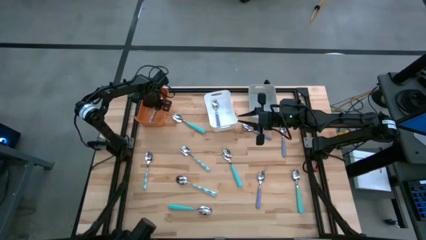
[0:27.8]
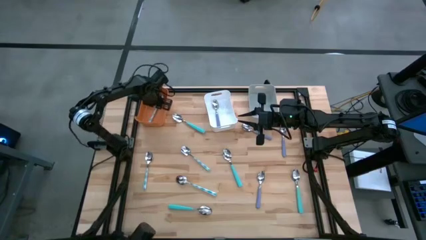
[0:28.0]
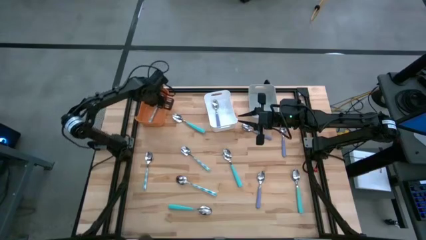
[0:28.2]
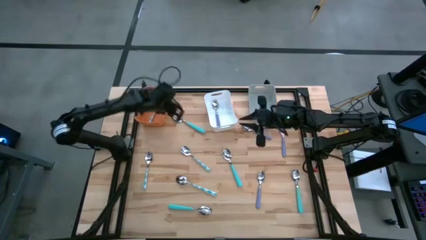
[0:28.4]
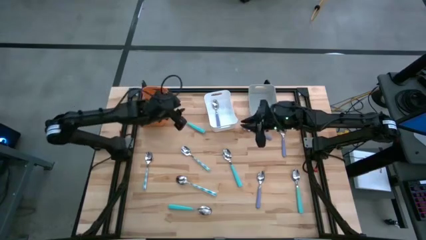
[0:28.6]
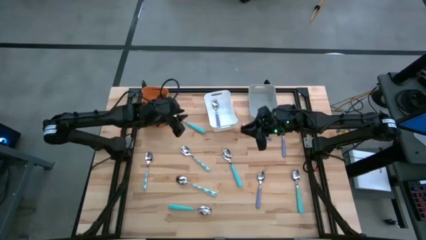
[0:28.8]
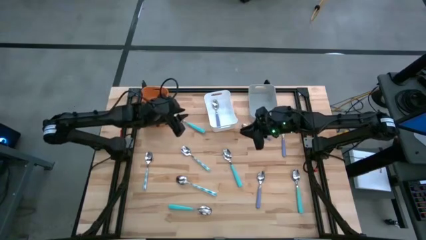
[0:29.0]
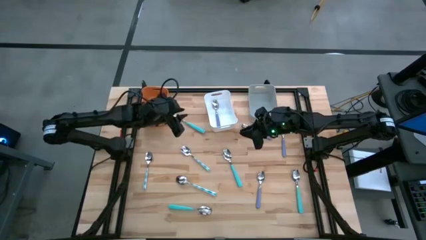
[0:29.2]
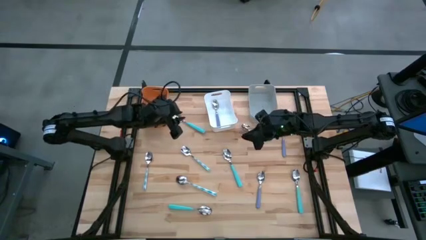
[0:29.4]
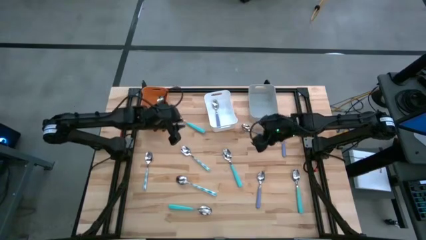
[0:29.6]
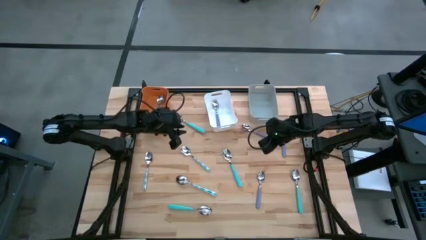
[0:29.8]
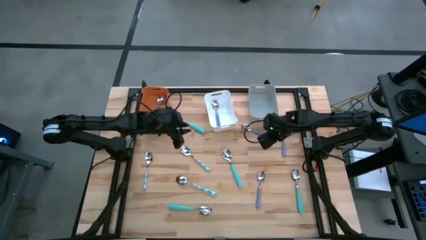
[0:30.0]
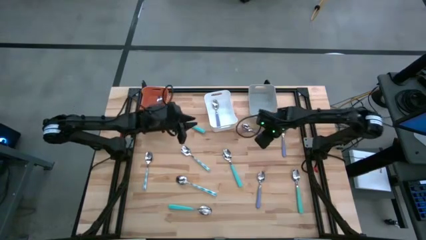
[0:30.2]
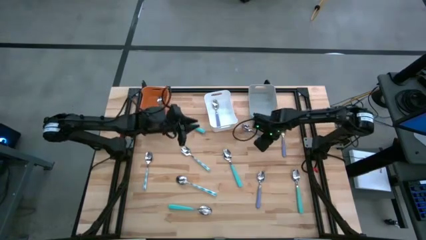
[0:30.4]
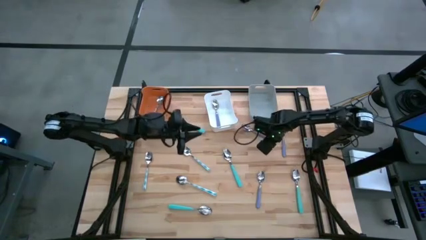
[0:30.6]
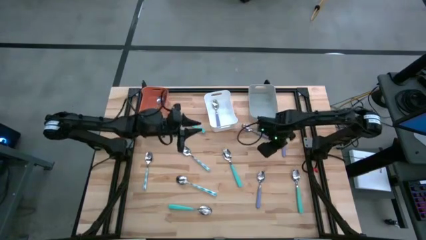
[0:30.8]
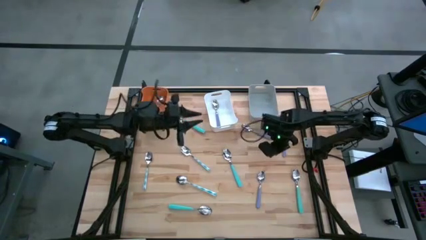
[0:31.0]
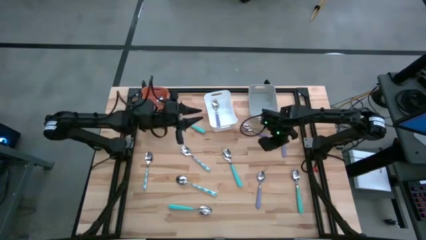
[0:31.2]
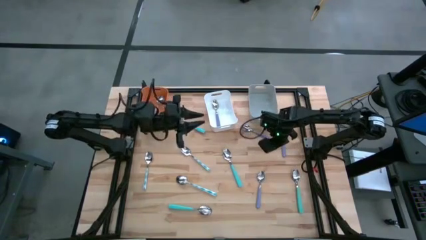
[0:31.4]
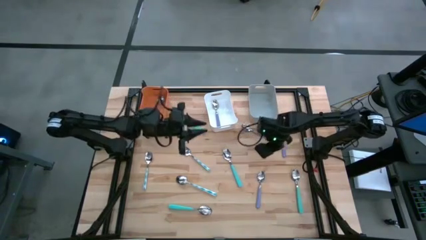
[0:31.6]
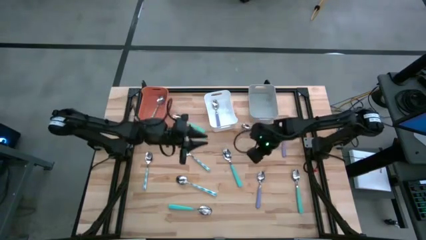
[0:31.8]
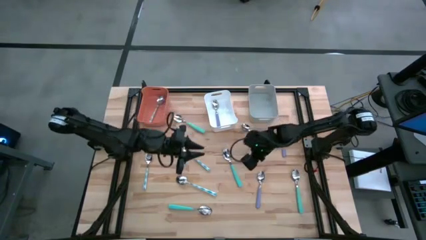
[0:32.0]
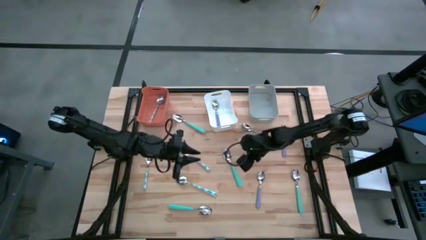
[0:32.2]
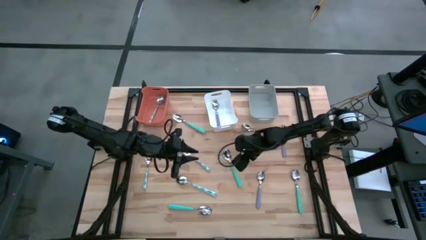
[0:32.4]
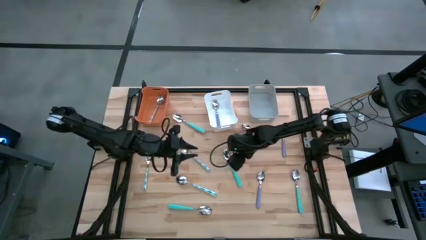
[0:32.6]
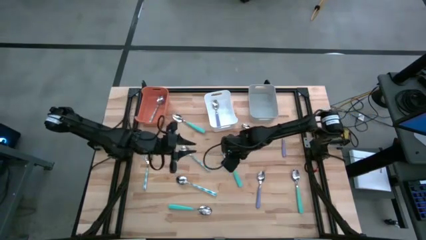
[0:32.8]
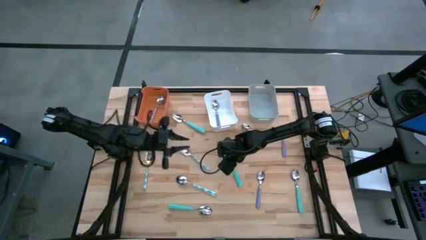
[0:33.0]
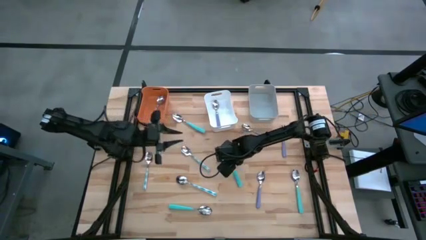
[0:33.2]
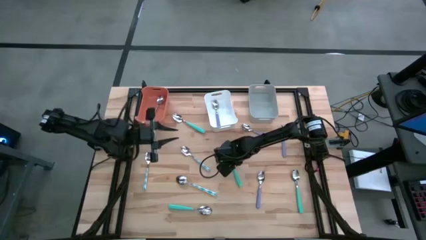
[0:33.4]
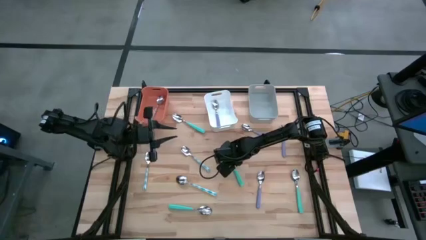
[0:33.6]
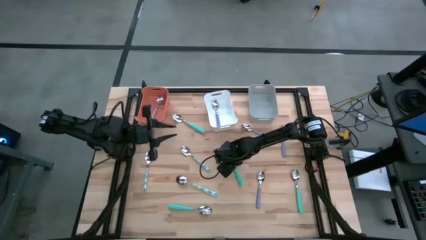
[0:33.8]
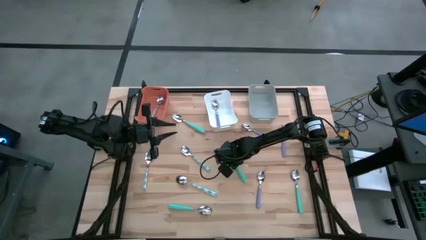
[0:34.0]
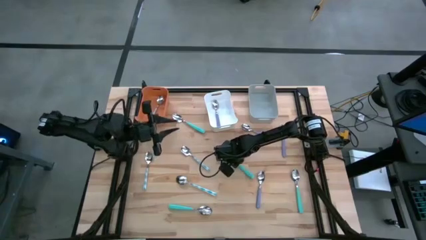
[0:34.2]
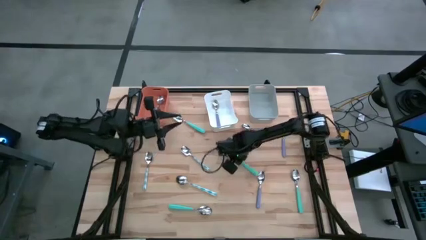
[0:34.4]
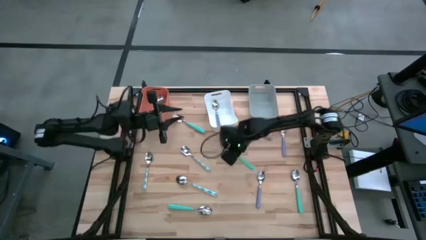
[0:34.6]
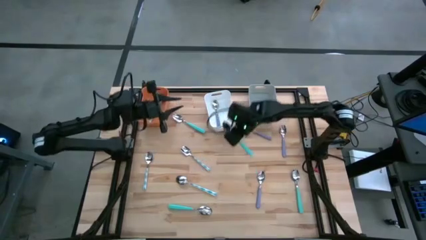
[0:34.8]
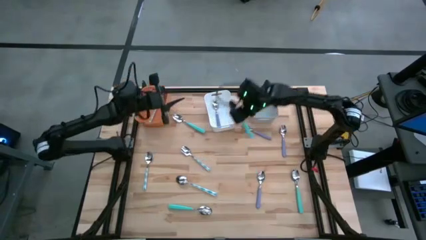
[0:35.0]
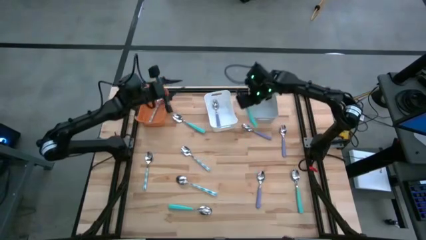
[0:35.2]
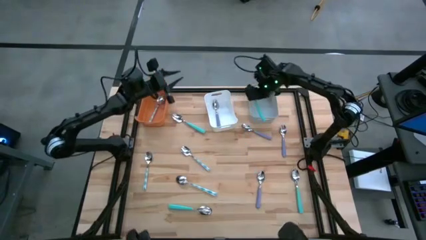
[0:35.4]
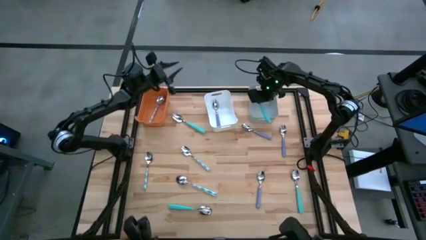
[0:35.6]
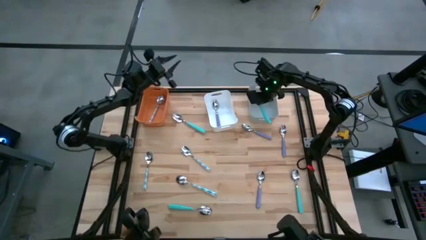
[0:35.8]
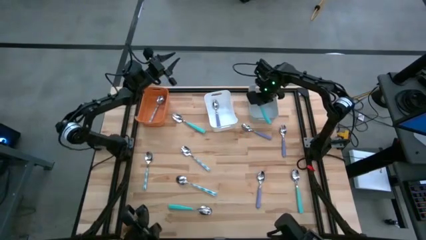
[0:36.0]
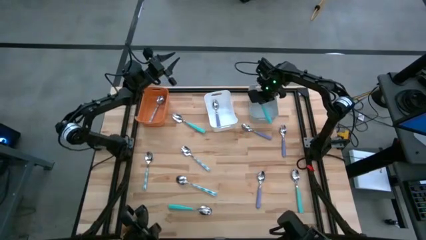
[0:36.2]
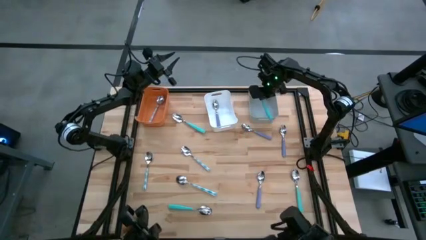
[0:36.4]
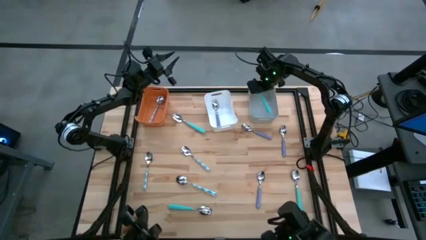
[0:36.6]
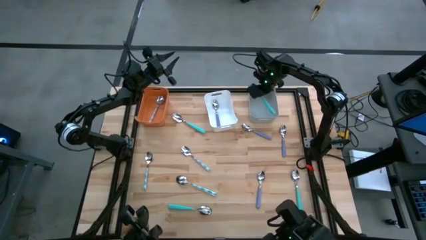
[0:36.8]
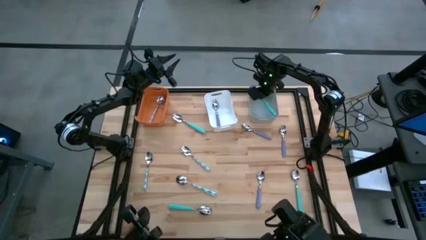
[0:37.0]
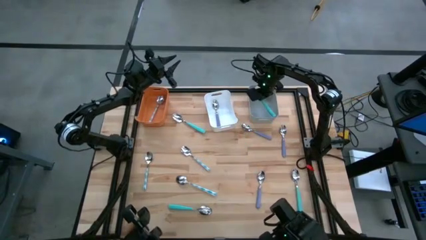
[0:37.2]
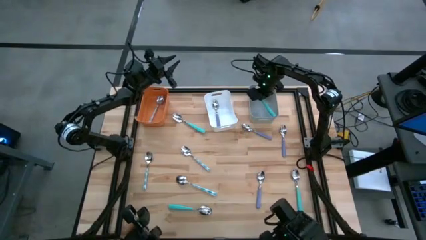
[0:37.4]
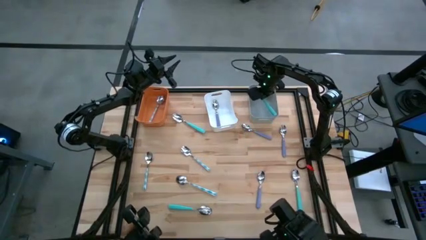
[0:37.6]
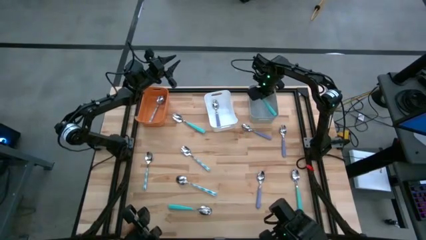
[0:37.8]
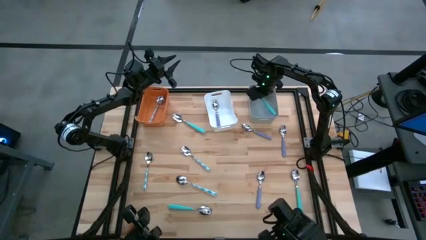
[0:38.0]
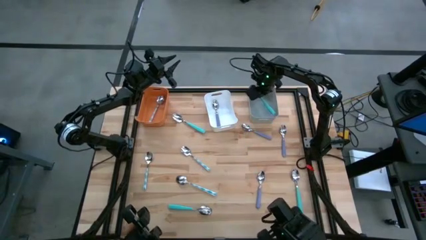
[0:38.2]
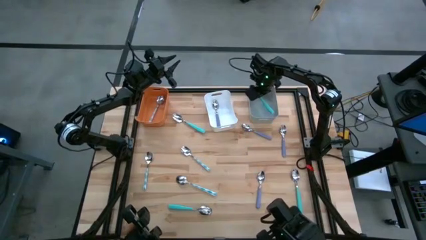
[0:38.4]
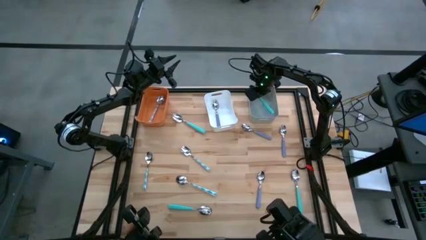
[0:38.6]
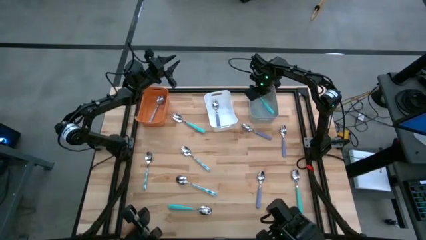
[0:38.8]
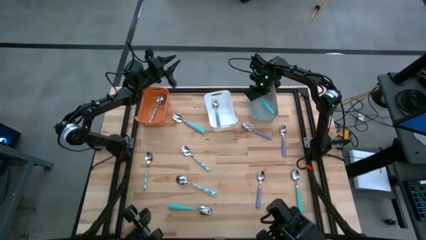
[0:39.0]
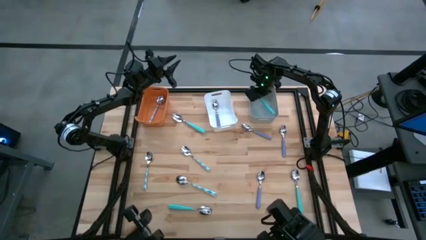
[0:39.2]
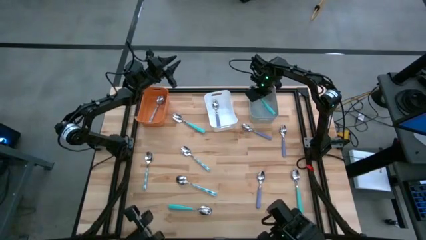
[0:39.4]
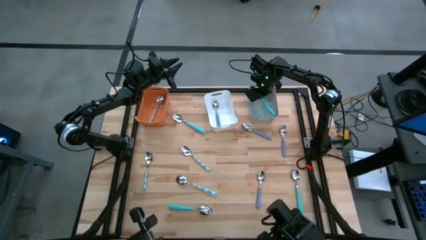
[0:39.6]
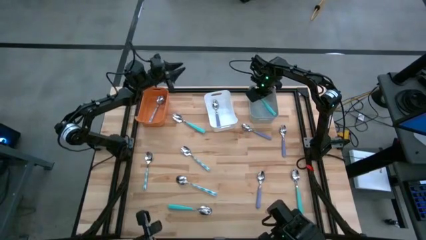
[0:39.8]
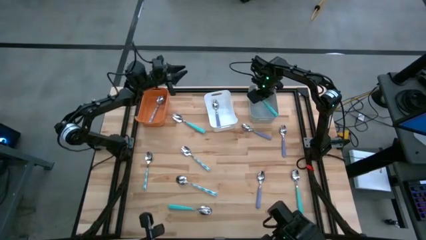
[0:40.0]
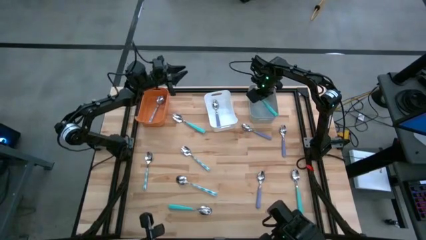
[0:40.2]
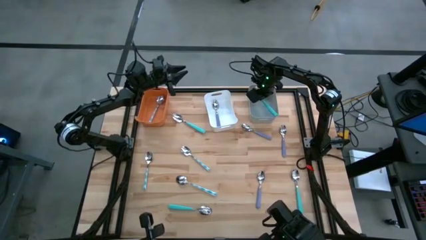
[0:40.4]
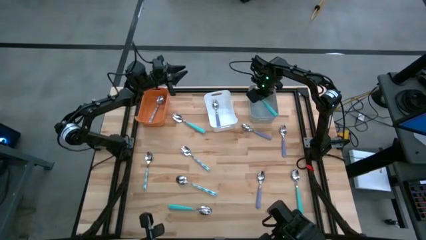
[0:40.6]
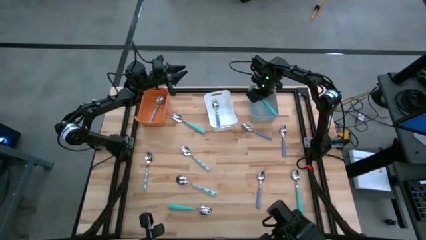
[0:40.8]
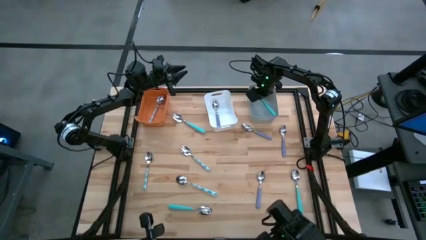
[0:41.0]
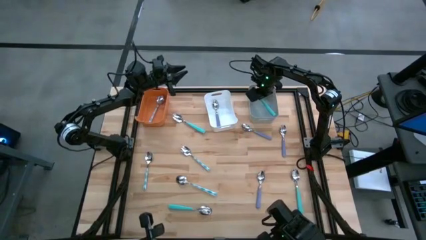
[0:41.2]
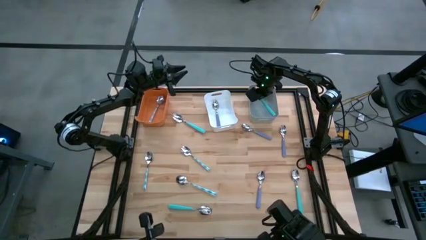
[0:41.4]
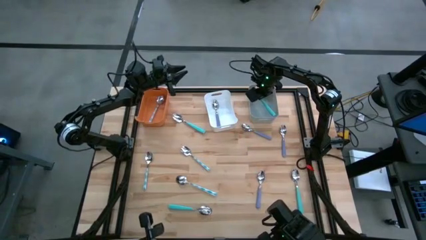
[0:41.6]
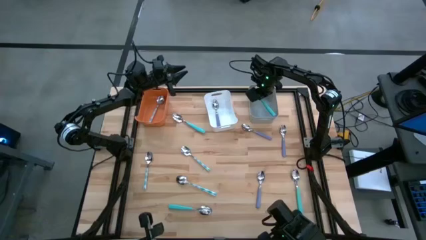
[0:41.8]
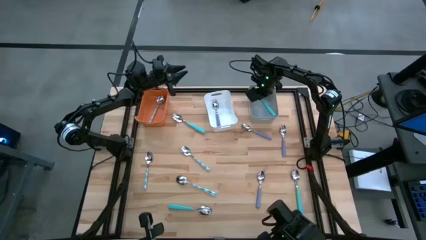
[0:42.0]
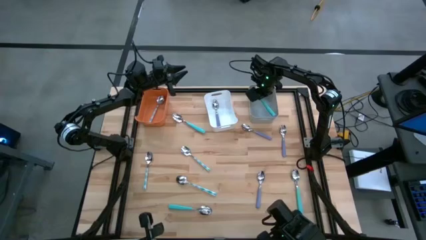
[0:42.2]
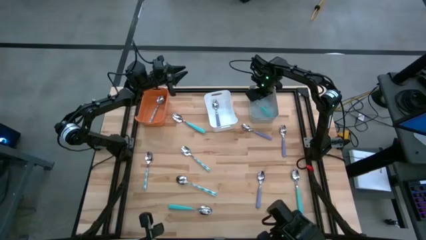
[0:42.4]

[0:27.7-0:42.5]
Task: Sort silverware by color (type)
Put the blue spoon into the gray bin
